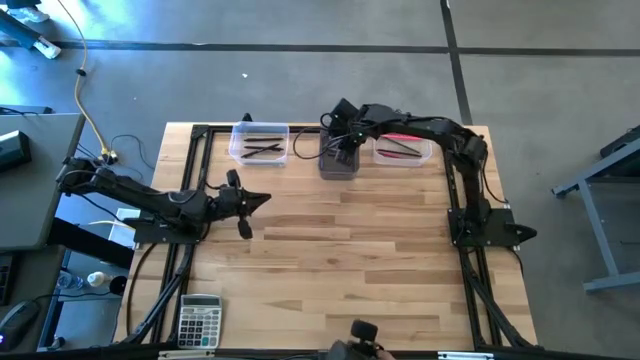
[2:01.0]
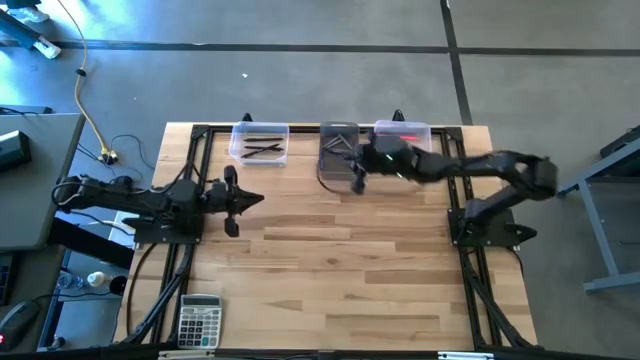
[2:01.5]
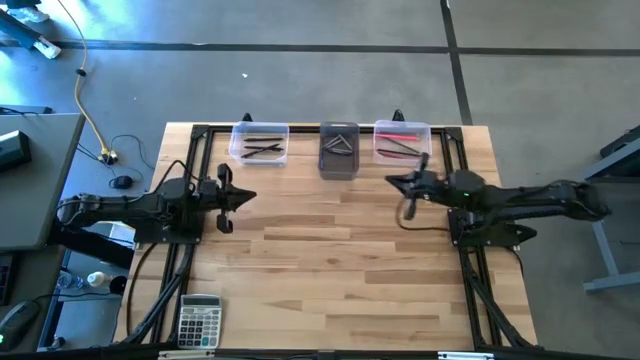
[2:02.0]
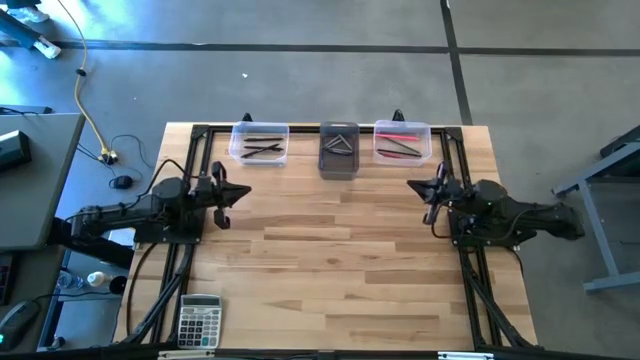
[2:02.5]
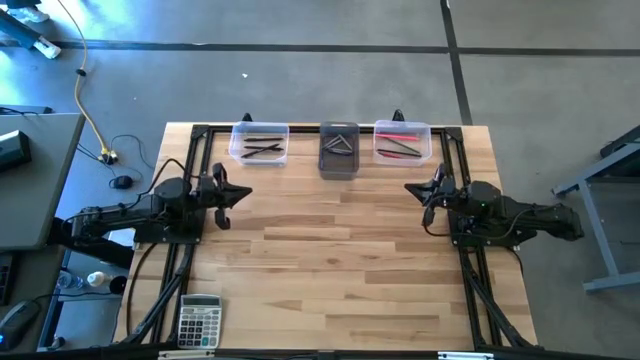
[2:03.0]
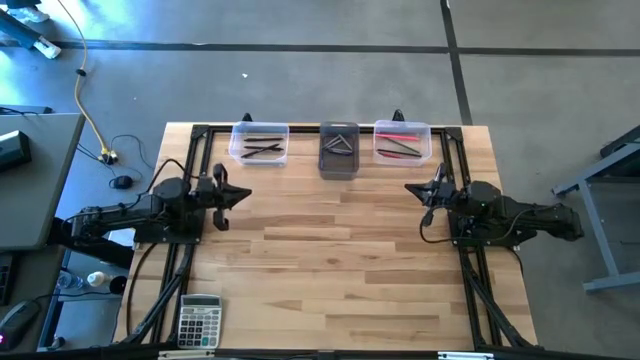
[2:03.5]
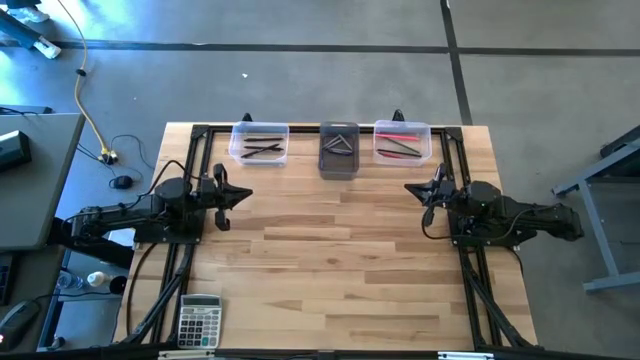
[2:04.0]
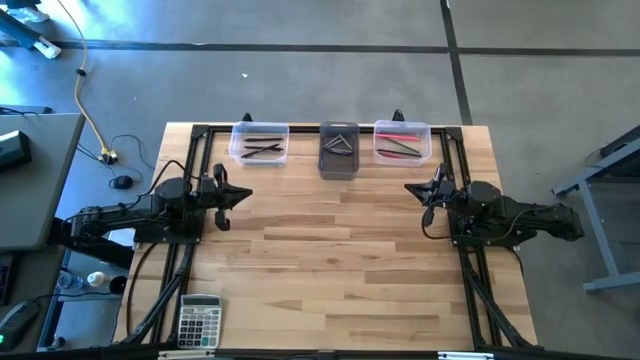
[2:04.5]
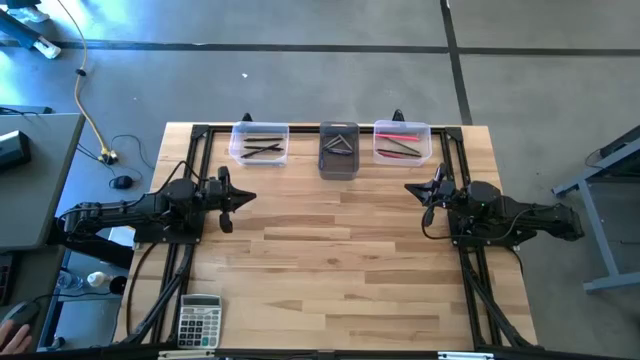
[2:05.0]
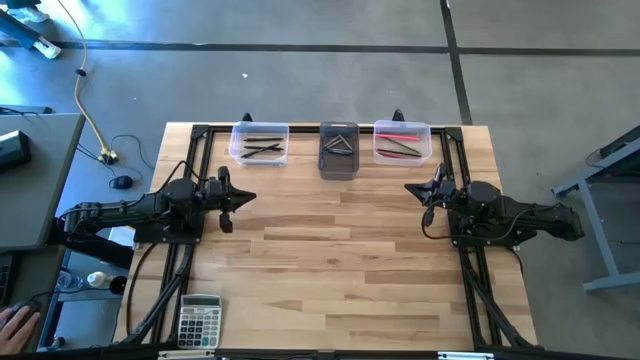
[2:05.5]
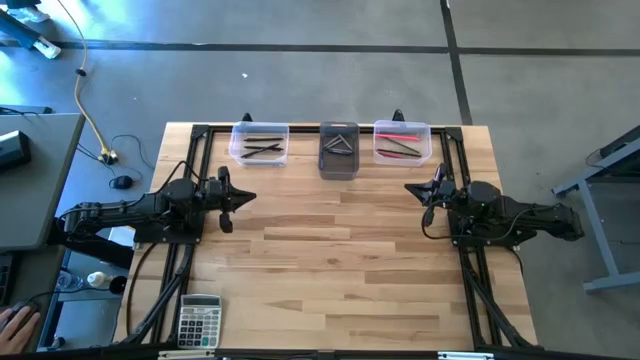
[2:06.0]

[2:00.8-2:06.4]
Task: Sort crayons/erasers/pens/pencils in bins
Return to Home Position

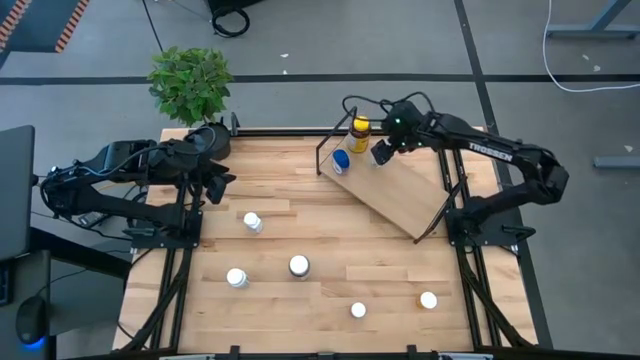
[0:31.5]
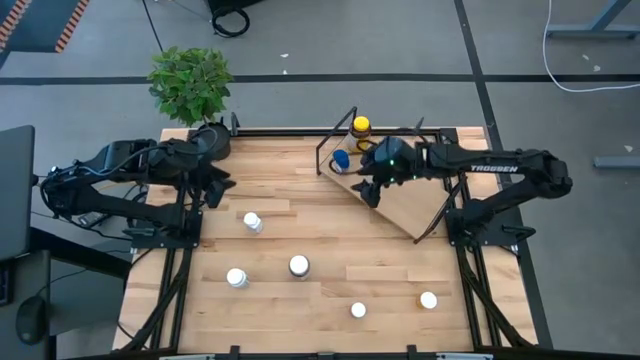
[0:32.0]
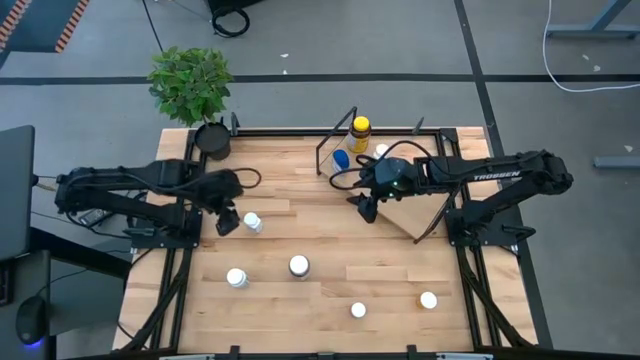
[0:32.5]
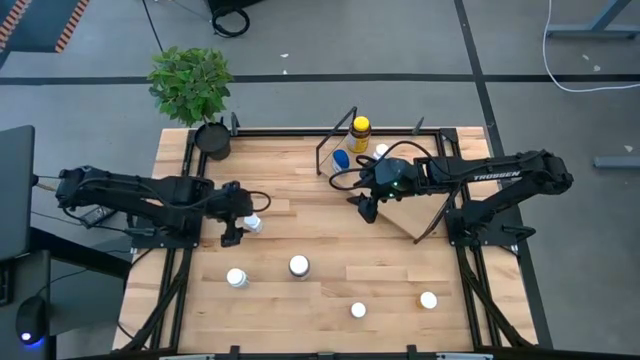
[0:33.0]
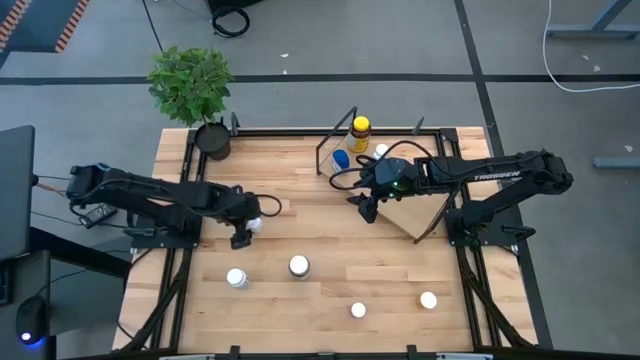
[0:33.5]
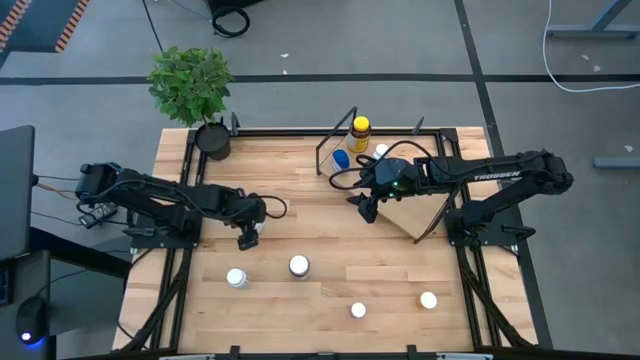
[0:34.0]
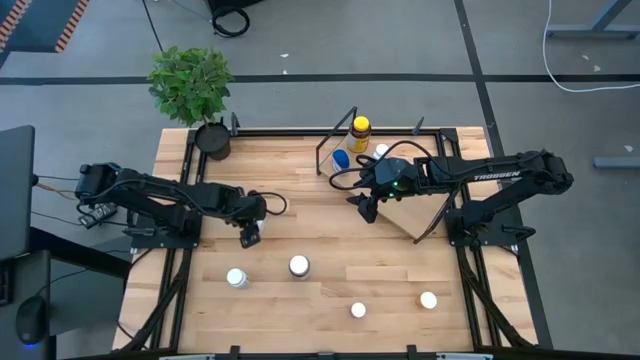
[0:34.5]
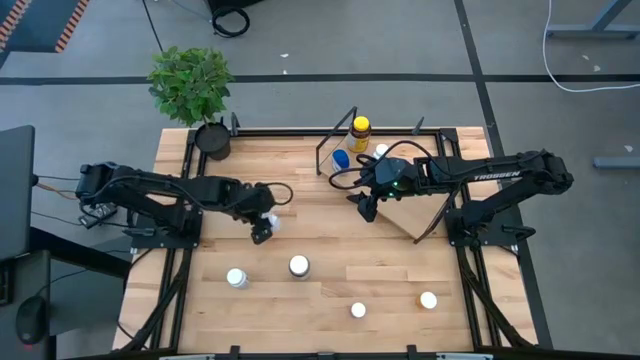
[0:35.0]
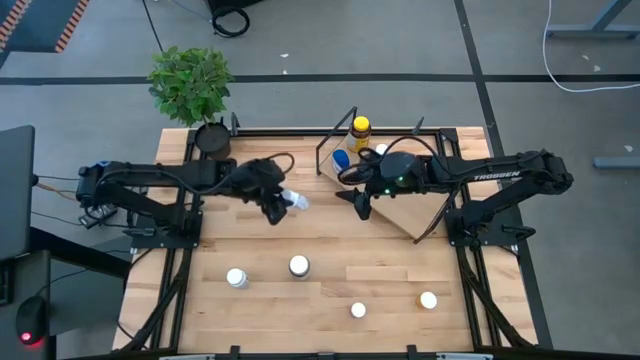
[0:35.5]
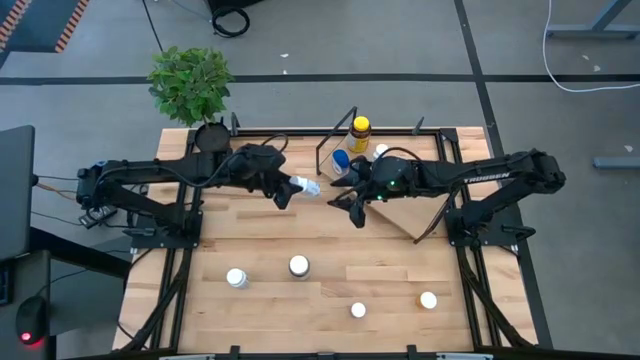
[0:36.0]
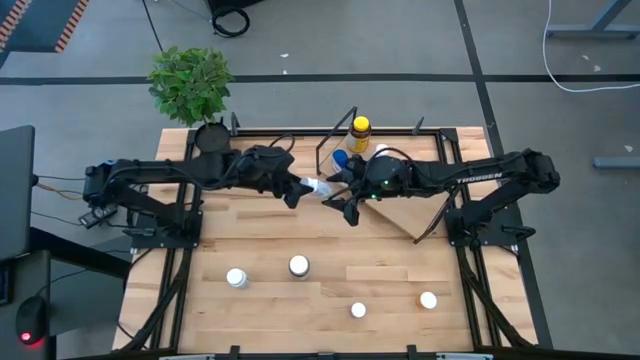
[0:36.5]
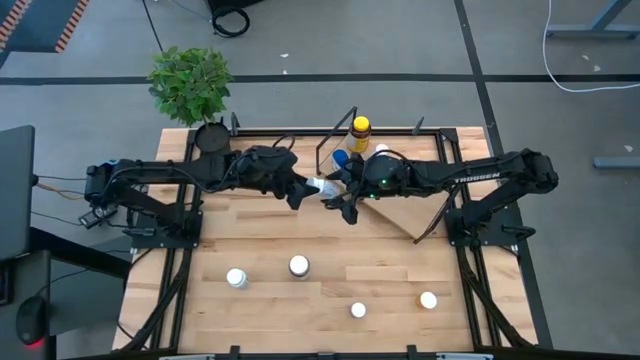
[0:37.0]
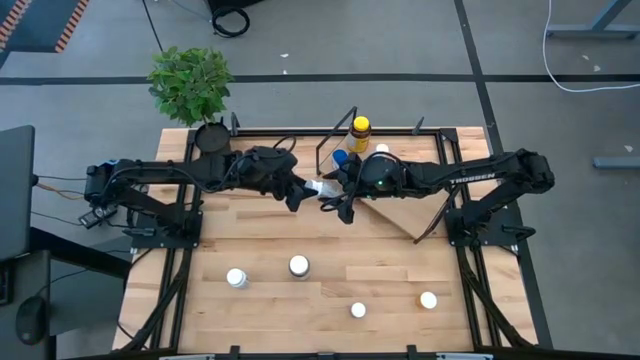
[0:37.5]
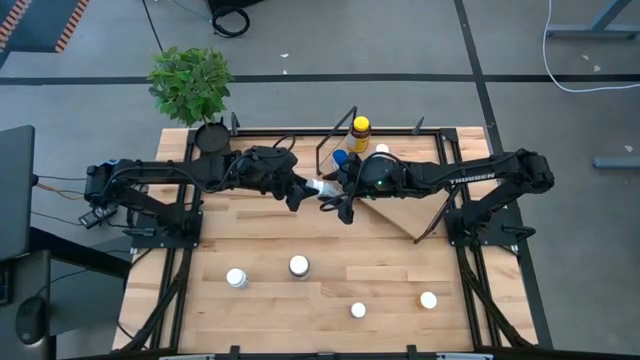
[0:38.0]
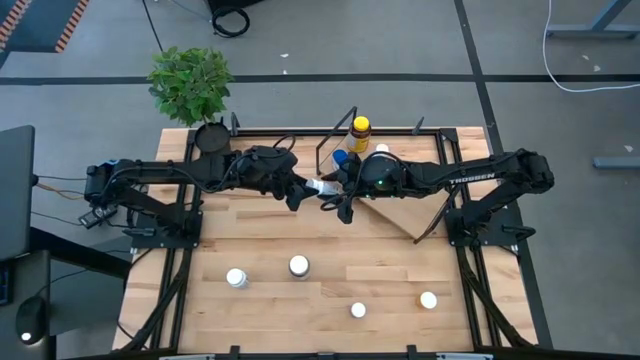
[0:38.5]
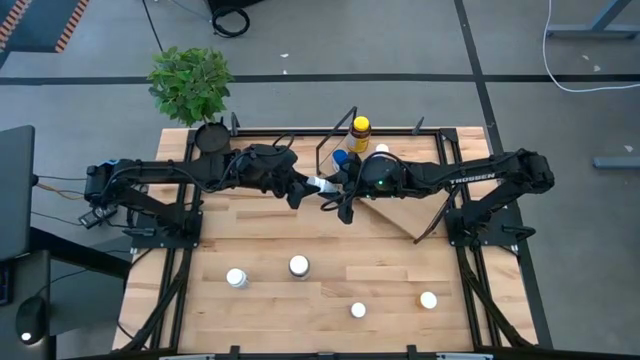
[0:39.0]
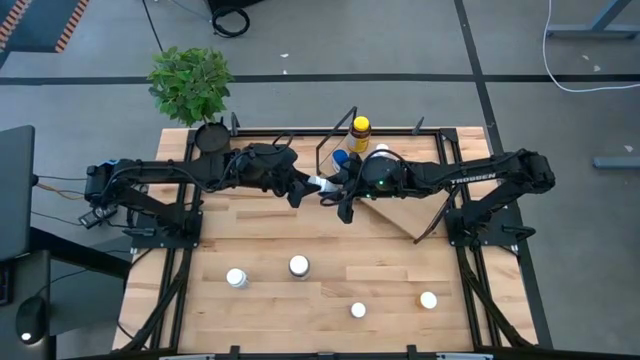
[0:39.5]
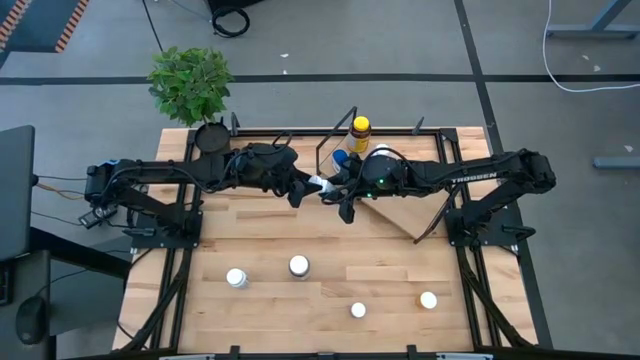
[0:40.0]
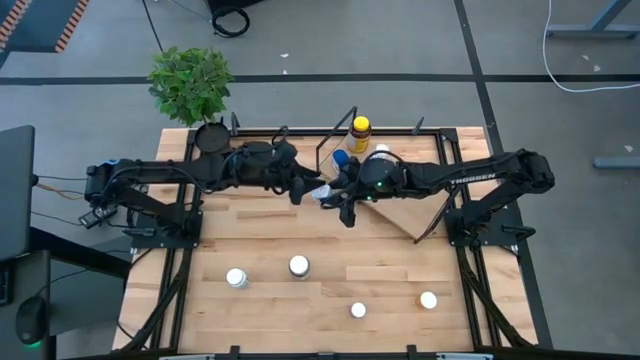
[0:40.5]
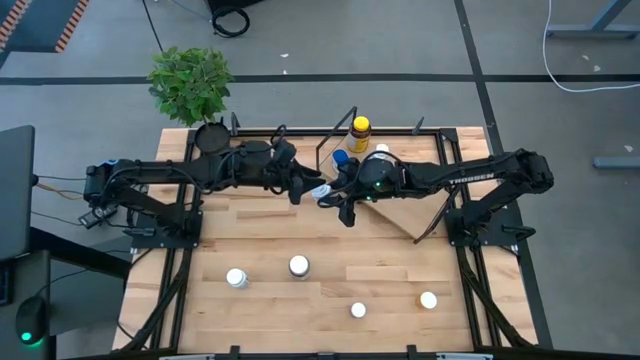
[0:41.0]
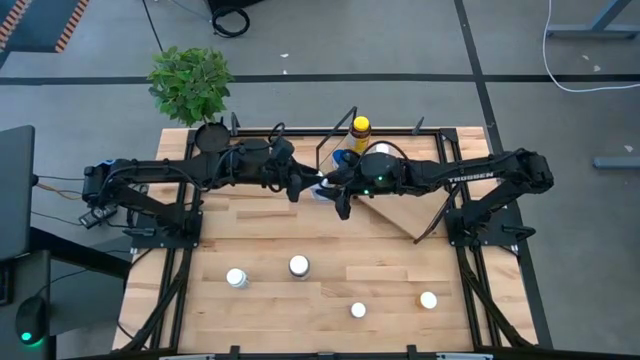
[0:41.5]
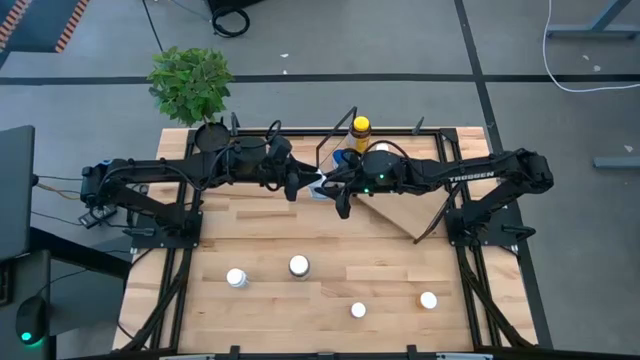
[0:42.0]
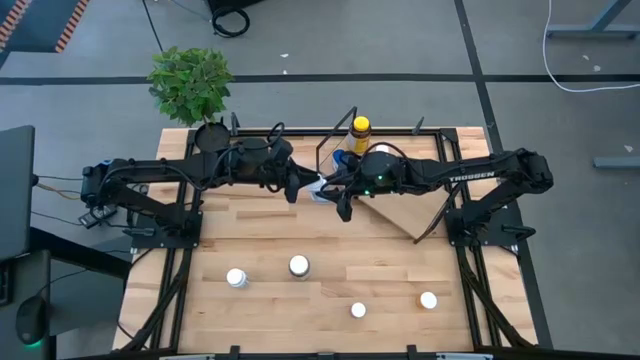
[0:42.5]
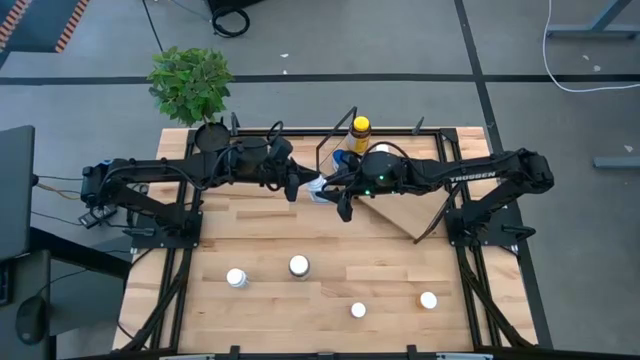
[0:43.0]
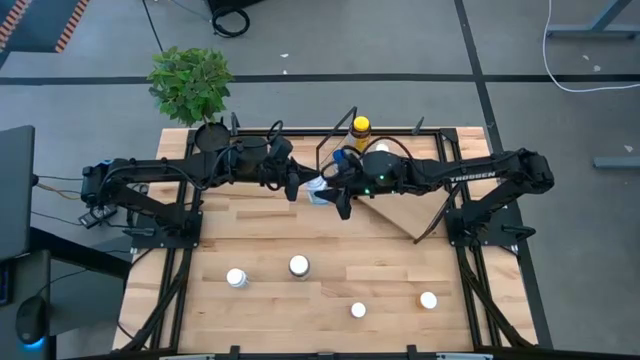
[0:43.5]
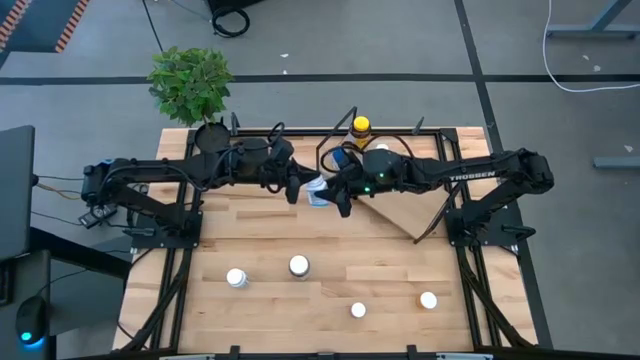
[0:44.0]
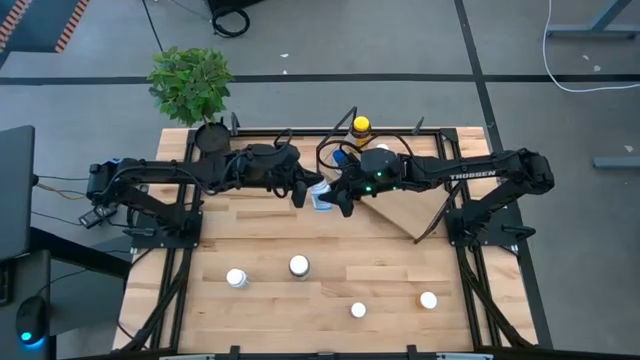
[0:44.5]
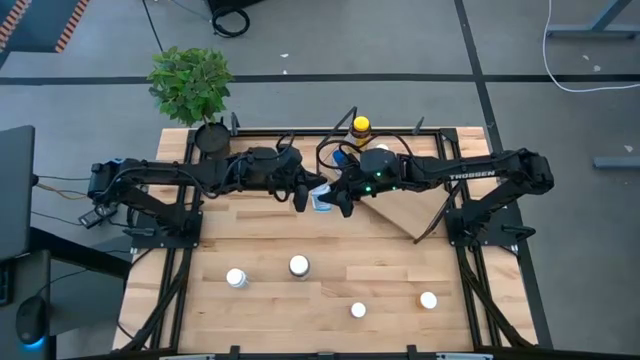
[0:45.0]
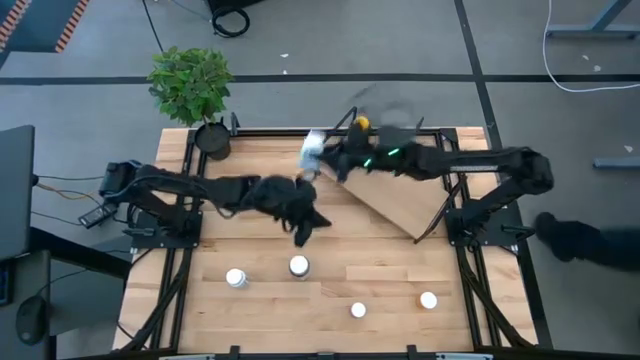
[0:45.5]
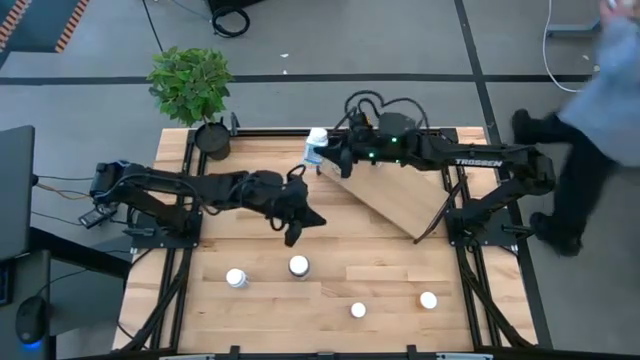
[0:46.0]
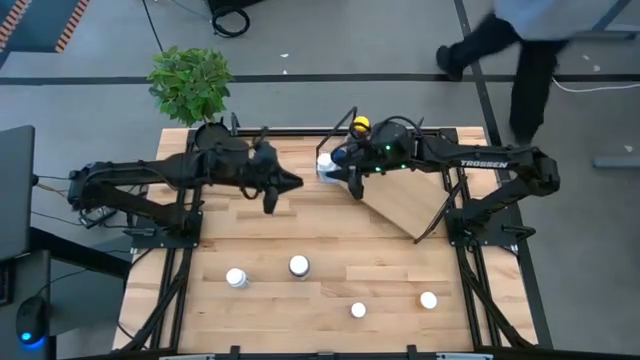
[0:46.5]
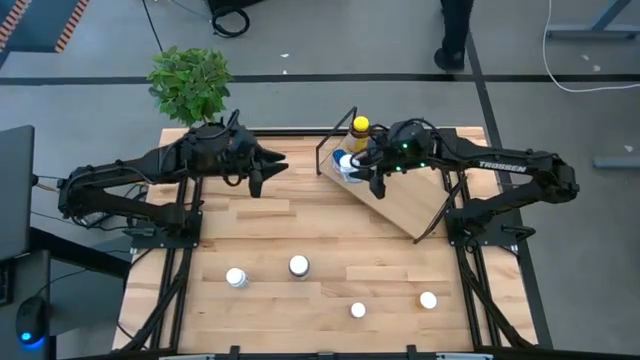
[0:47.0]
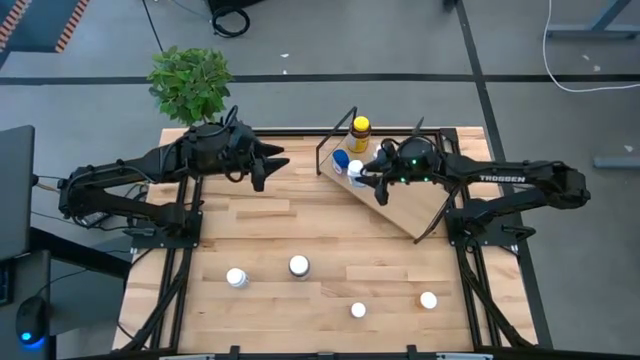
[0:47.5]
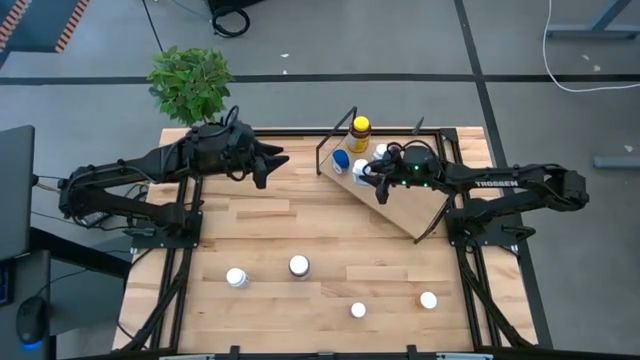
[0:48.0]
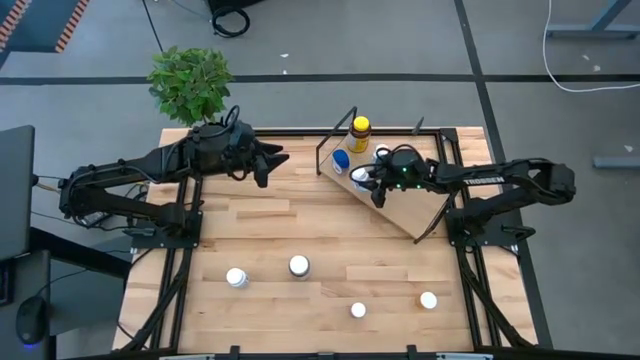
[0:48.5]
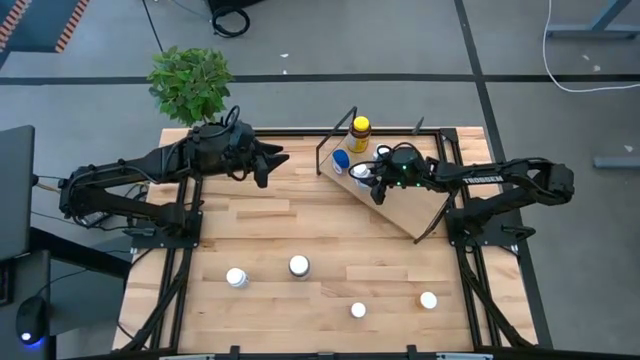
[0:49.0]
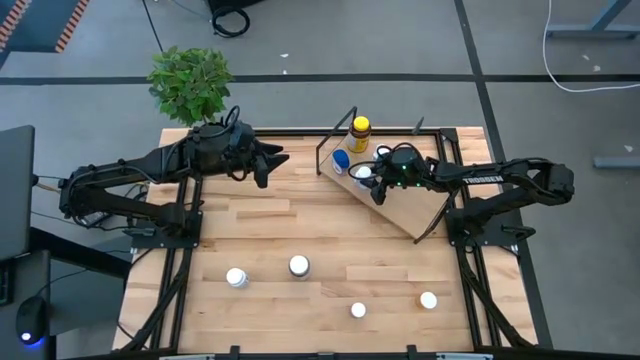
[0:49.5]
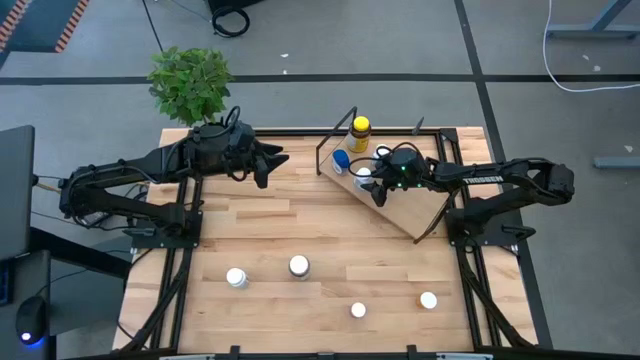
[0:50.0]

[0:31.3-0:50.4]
Task: Pick and place medicine bottles onto shelf by color
Put the white and blue medicine bottle on the shelf aligned with the other white and blue medicine bottle
